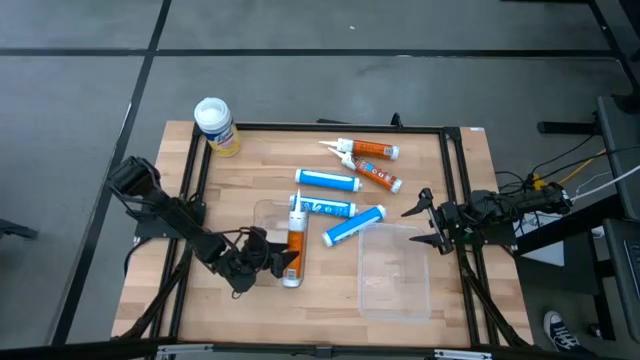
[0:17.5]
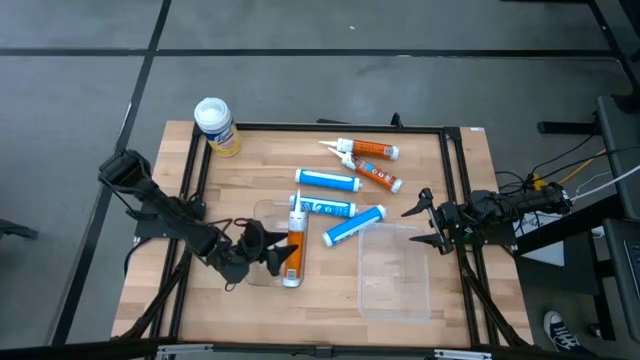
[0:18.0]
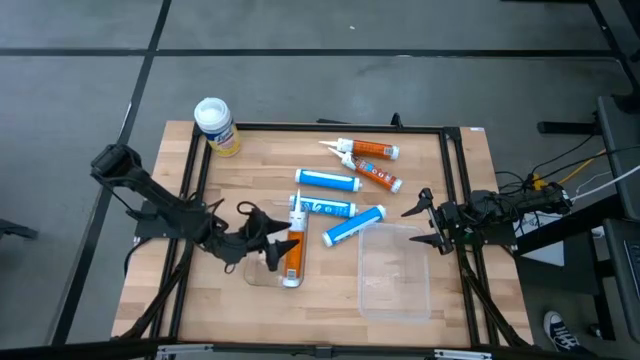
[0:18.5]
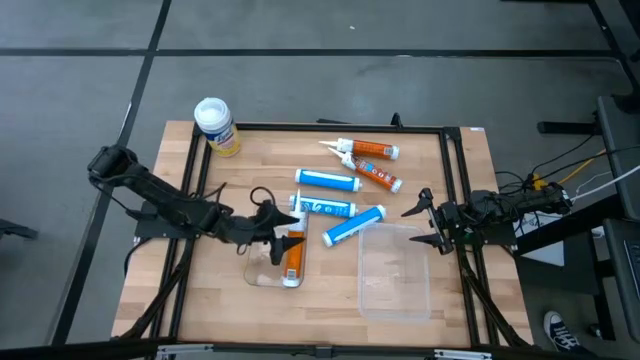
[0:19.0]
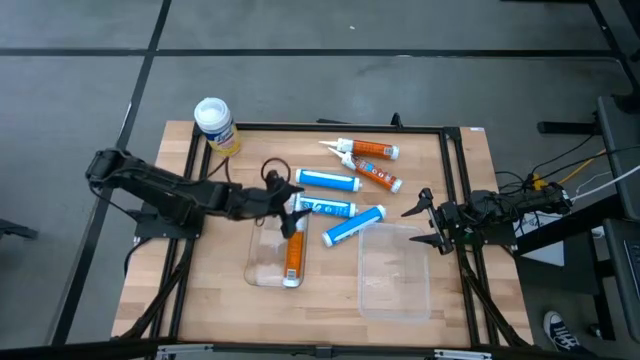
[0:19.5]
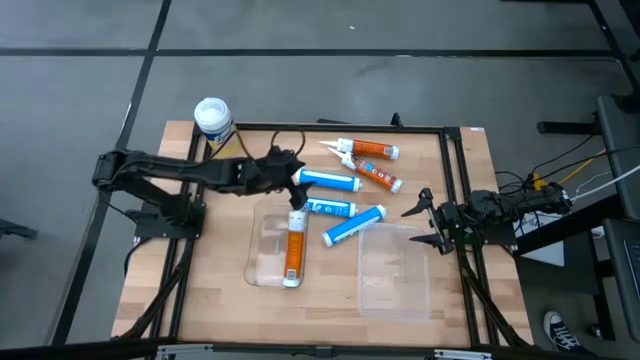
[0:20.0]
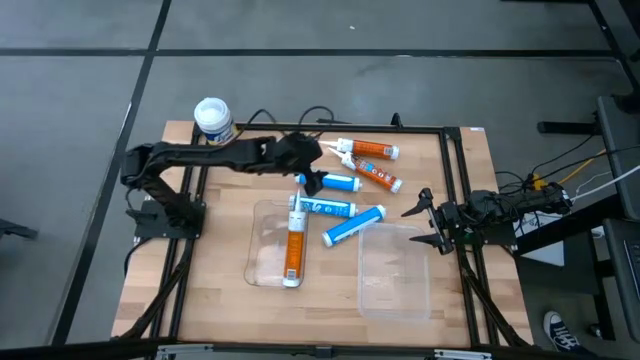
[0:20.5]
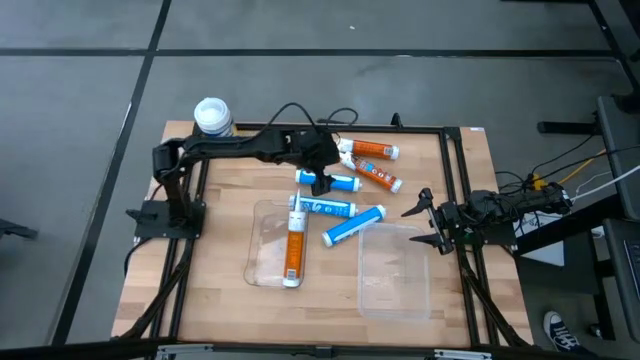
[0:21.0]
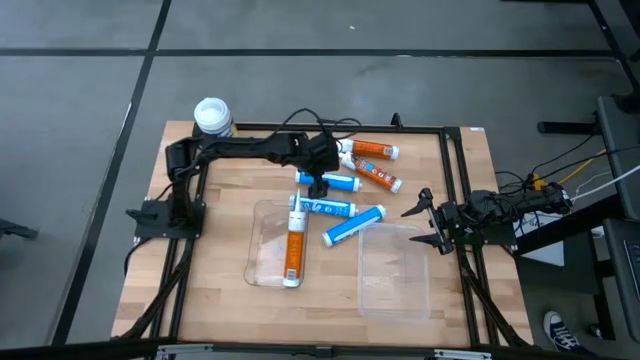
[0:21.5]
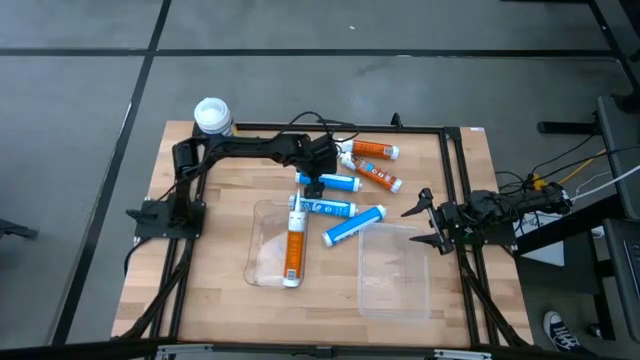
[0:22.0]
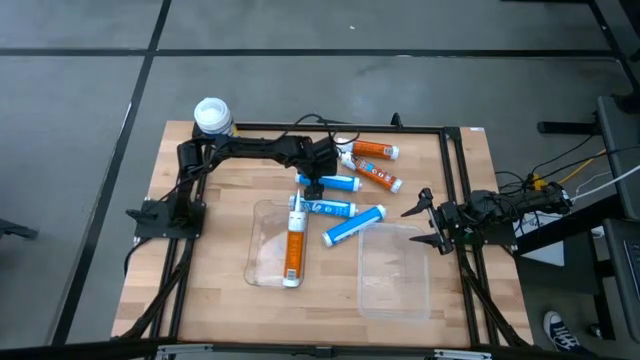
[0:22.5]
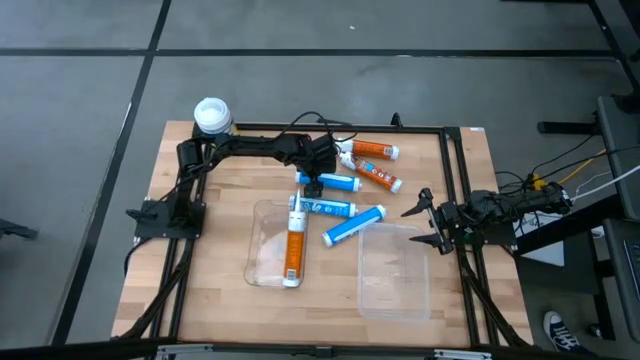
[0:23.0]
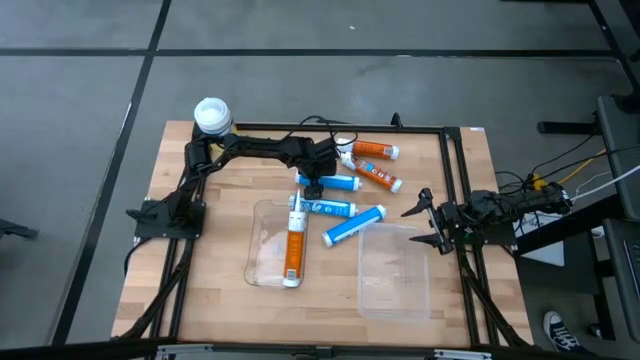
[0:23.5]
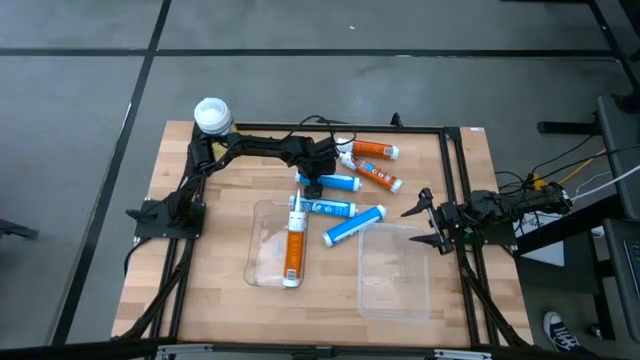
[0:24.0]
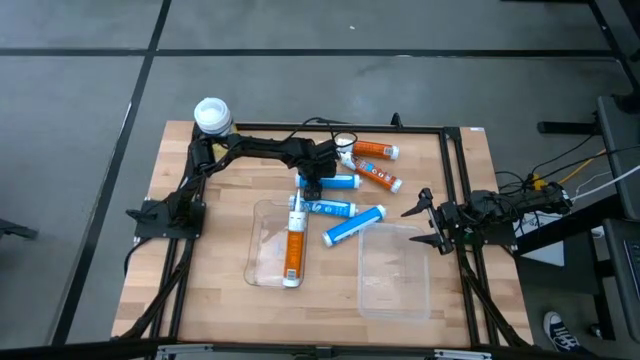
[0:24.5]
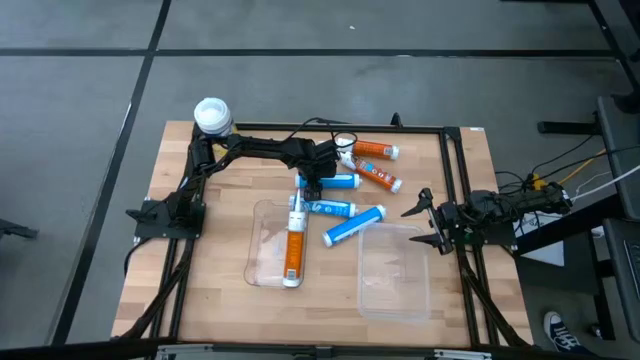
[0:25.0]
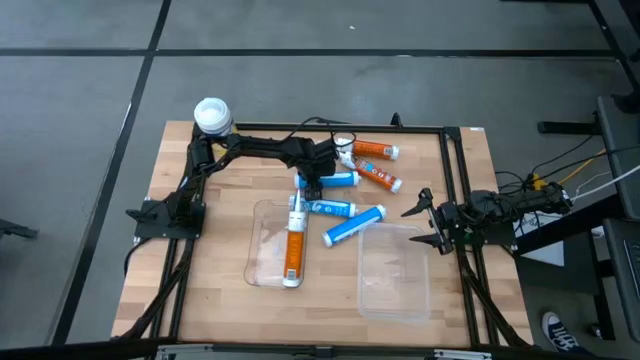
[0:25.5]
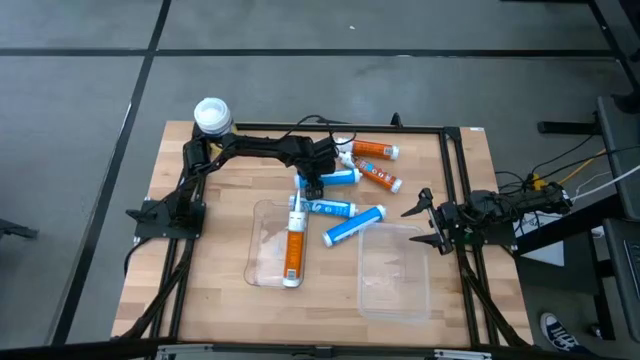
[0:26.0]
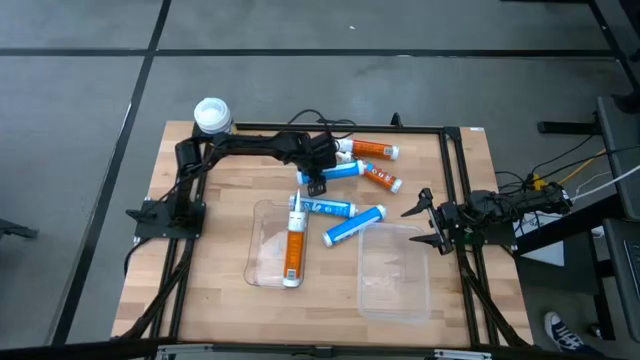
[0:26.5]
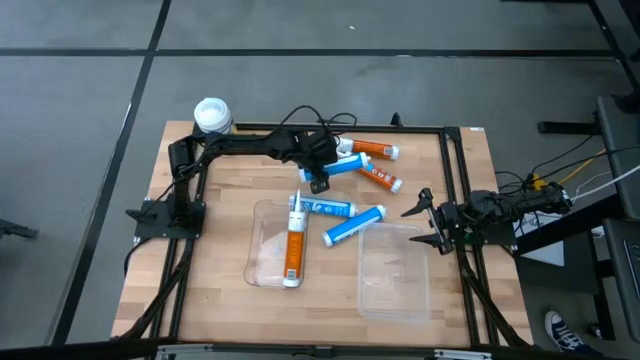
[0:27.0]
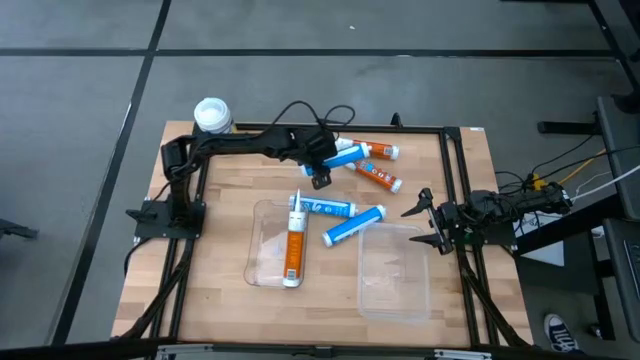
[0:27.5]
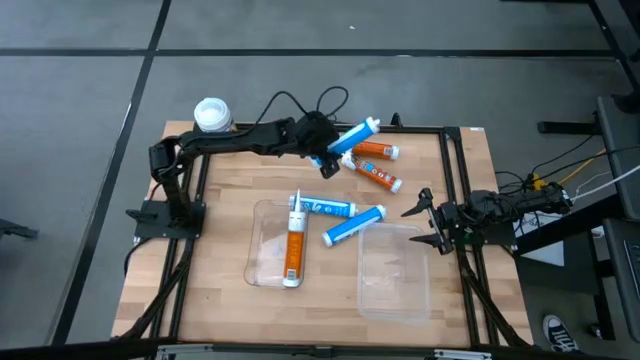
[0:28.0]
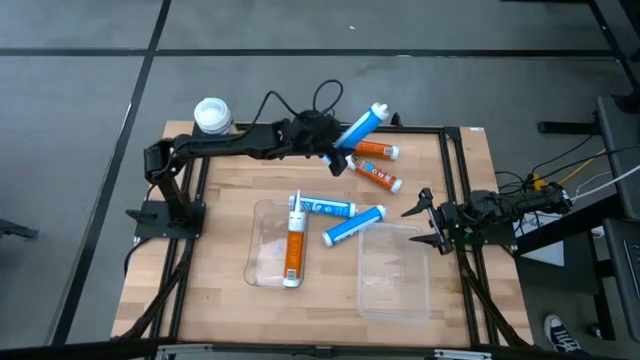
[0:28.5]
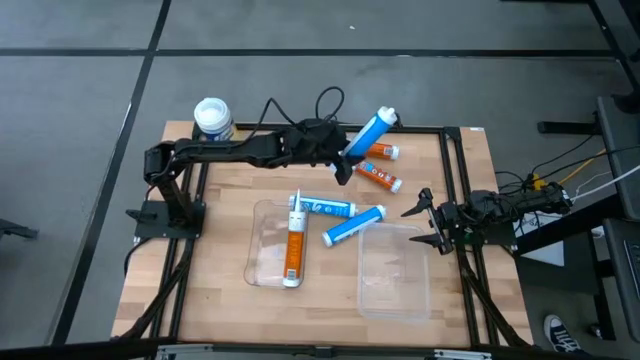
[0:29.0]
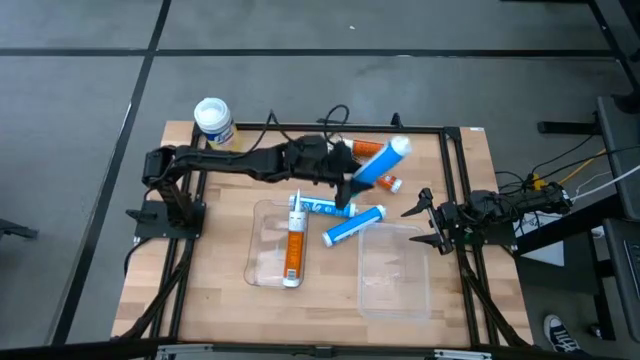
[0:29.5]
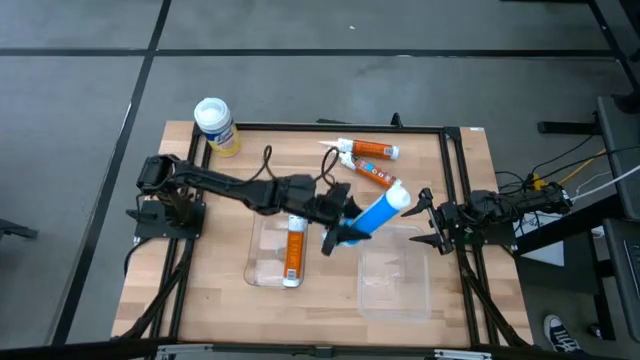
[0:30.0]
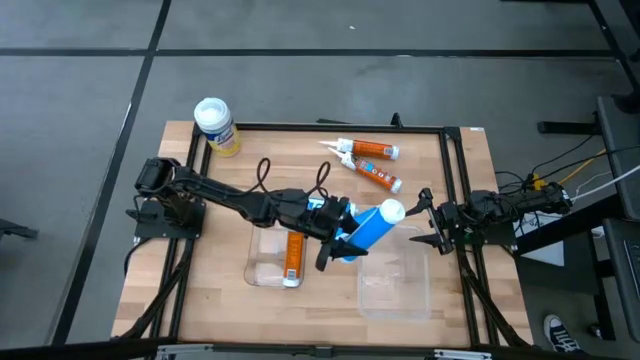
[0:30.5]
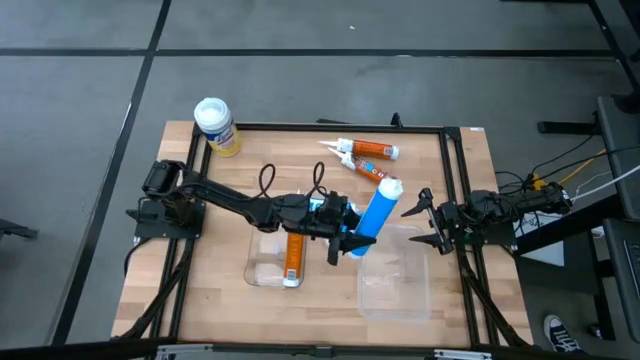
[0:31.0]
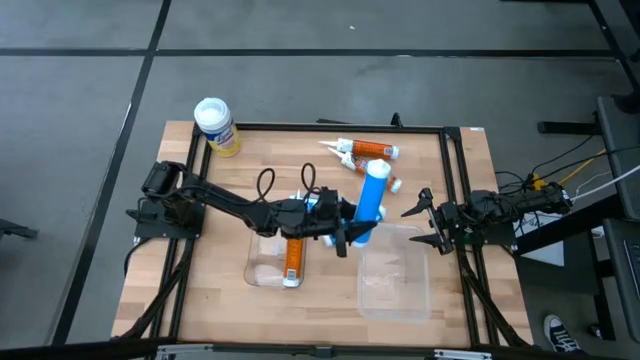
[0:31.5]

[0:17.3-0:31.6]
Task: Pick & place silicon tubes, Sealant and Lysol wipes
Put the top blue sealant into the right transparent bin

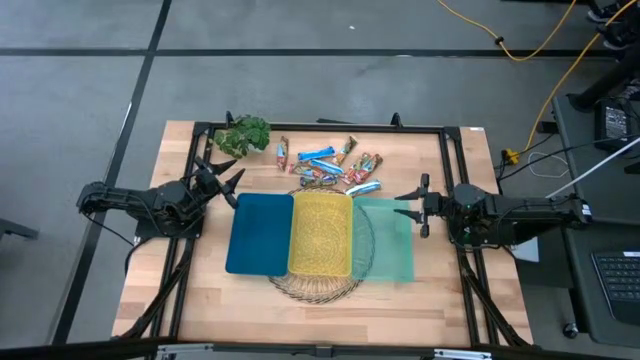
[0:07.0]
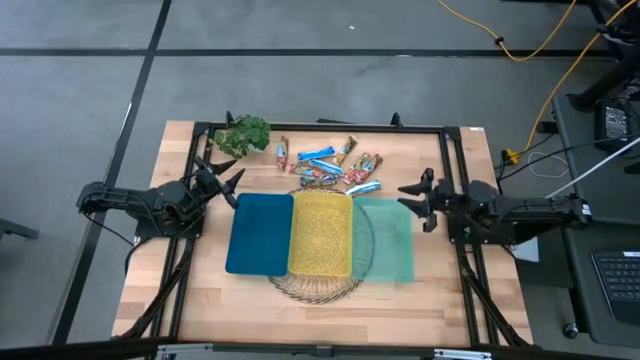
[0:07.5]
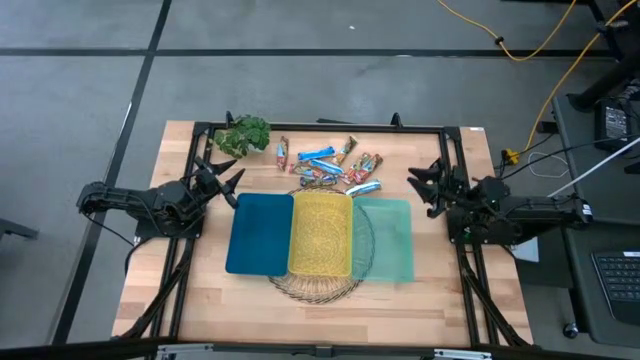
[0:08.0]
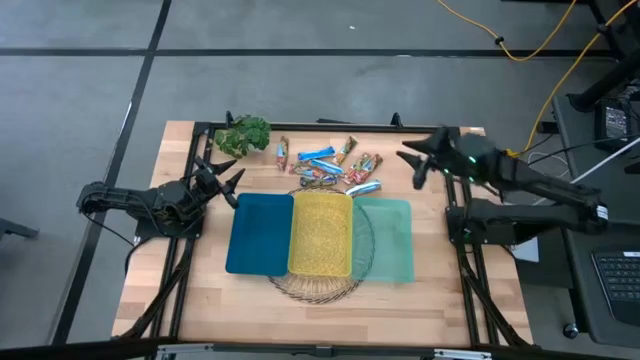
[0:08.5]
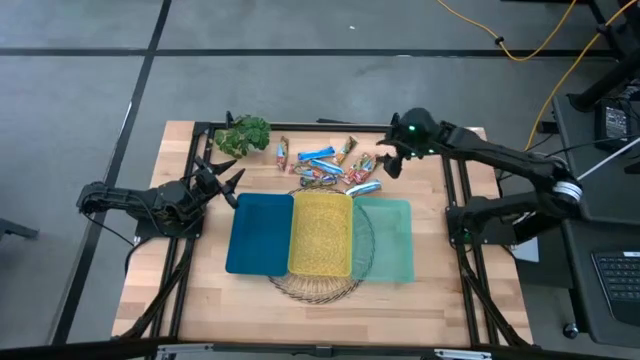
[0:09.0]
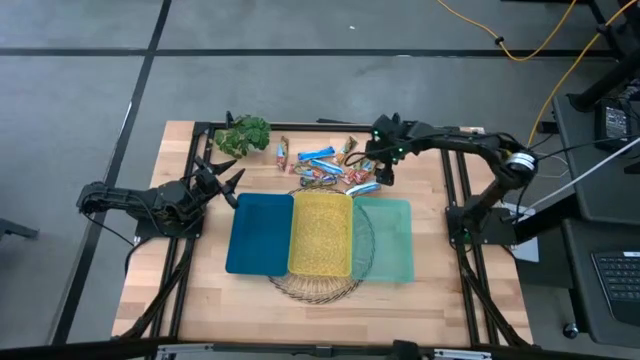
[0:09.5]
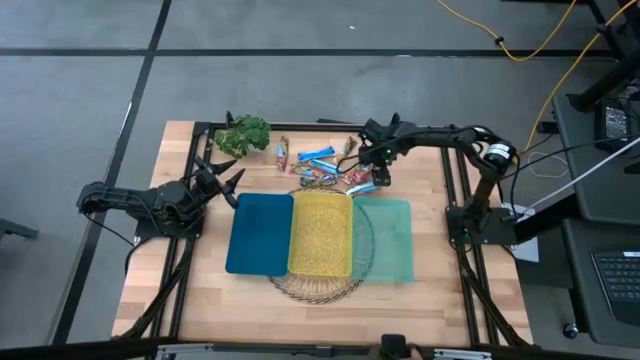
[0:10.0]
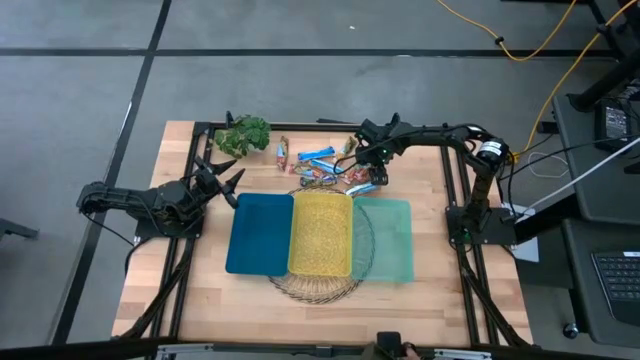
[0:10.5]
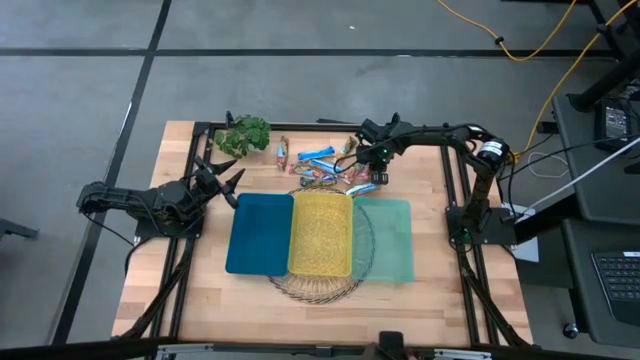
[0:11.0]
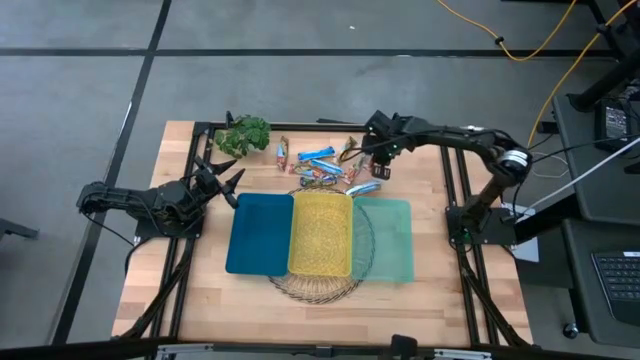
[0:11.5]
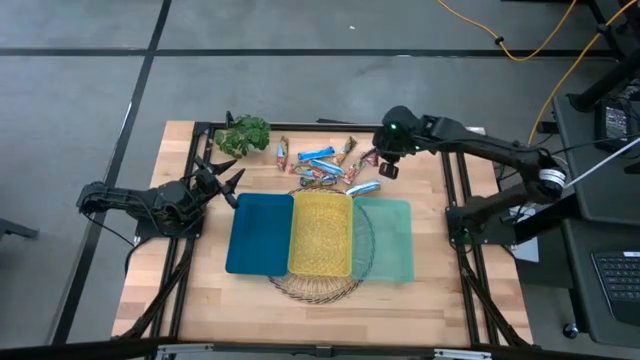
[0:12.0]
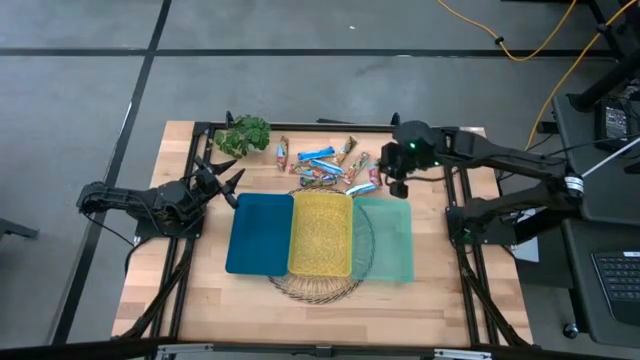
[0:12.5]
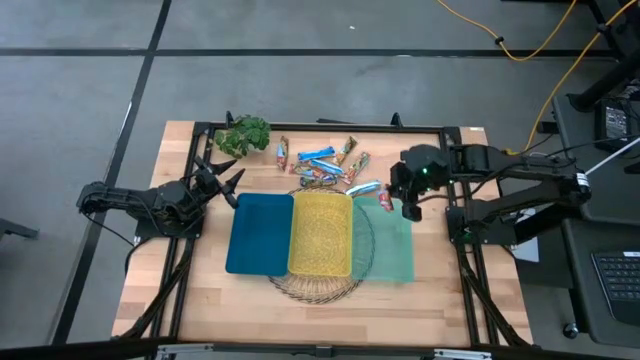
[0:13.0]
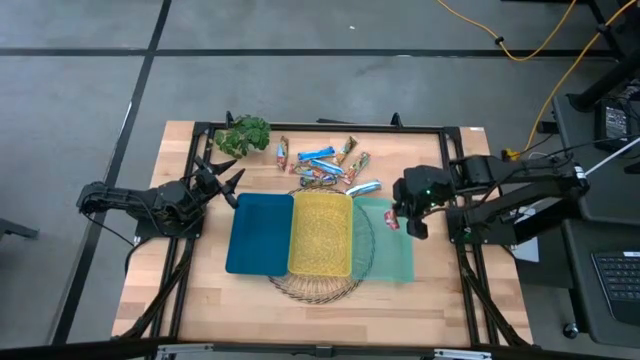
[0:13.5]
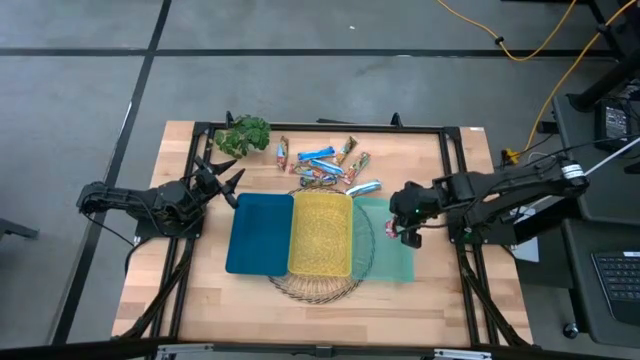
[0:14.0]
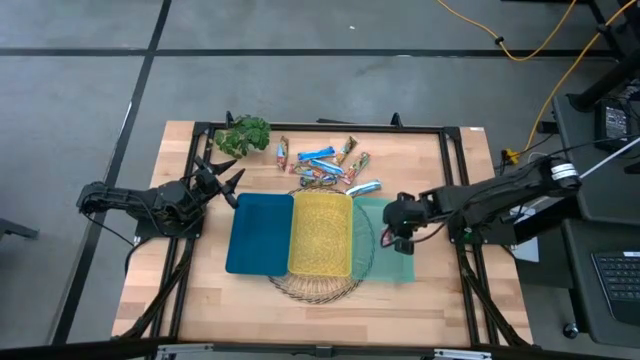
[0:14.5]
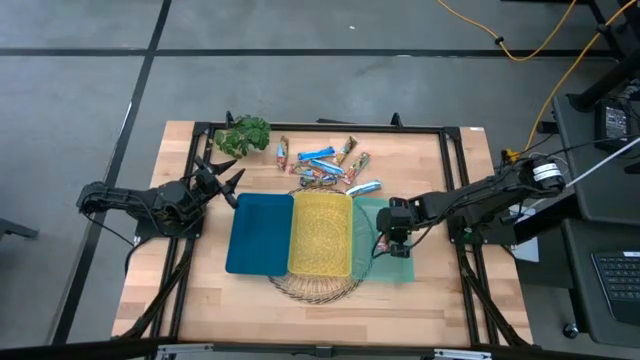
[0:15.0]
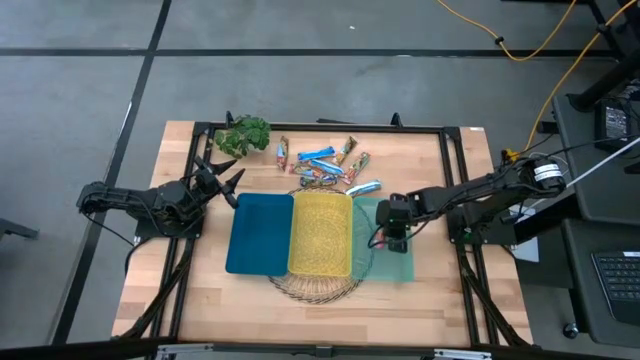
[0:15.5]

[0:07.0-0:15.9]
Task: Pick and place Granola Bars by type
Put the red granola bar into the green bin
